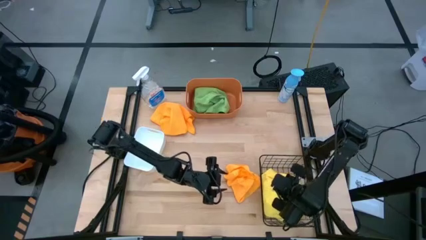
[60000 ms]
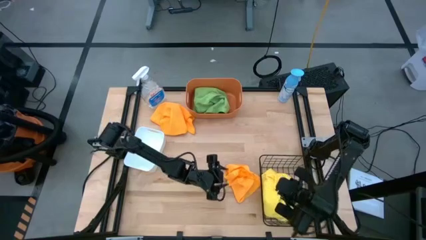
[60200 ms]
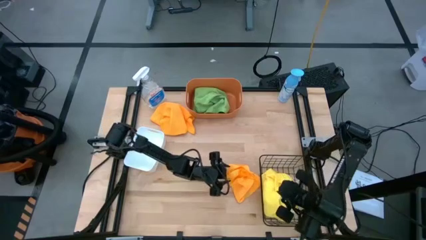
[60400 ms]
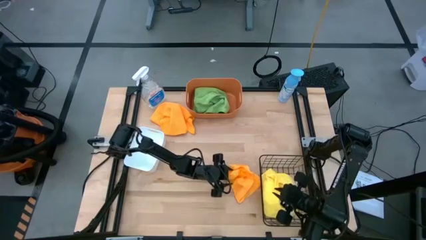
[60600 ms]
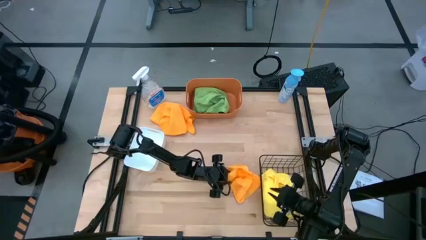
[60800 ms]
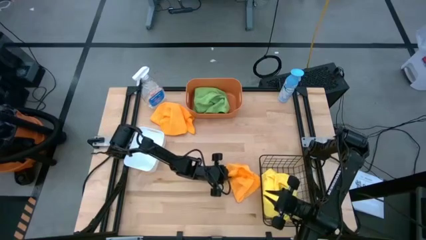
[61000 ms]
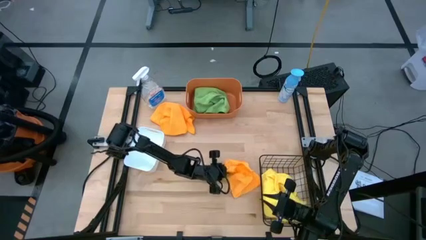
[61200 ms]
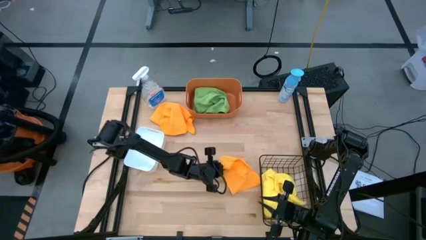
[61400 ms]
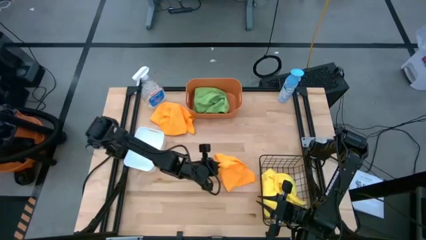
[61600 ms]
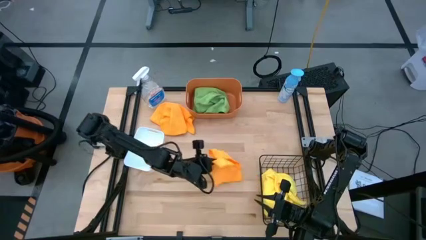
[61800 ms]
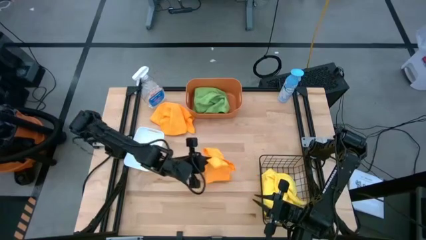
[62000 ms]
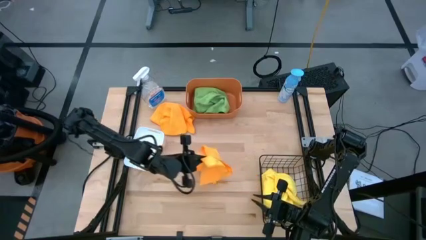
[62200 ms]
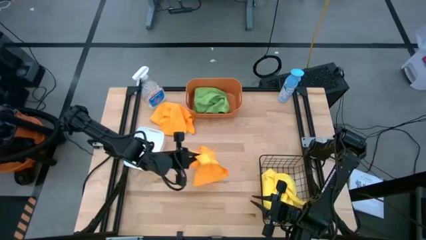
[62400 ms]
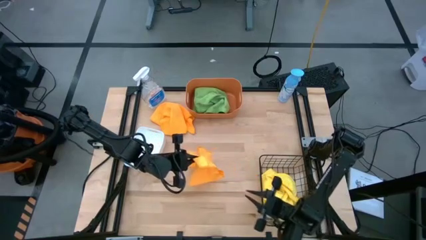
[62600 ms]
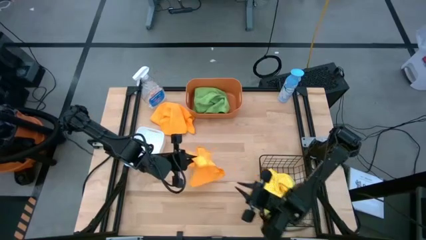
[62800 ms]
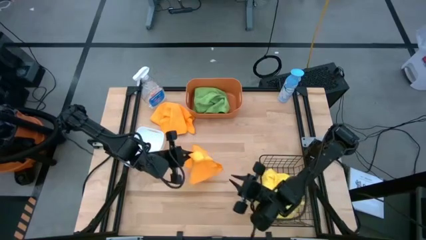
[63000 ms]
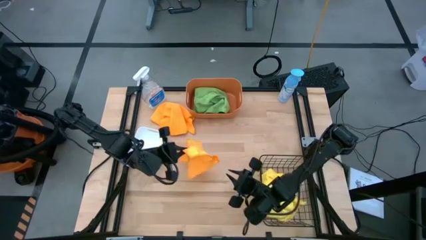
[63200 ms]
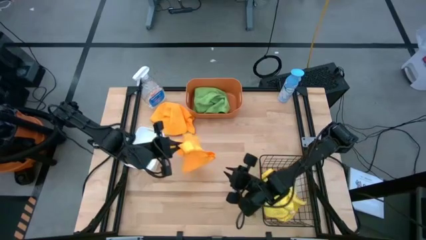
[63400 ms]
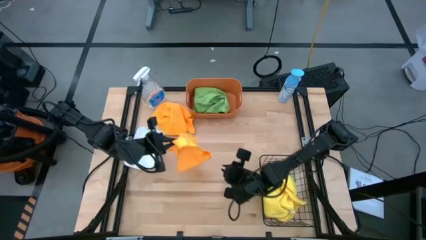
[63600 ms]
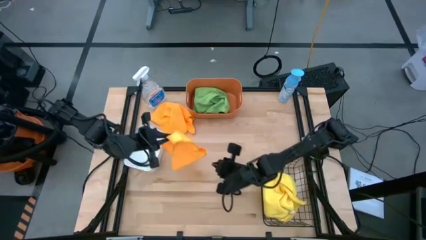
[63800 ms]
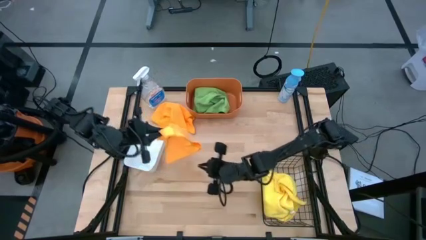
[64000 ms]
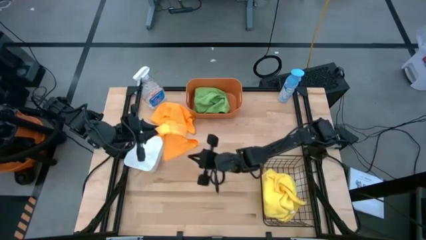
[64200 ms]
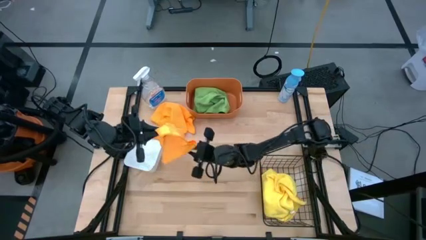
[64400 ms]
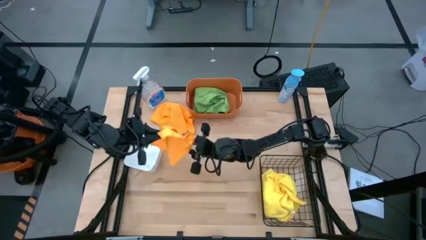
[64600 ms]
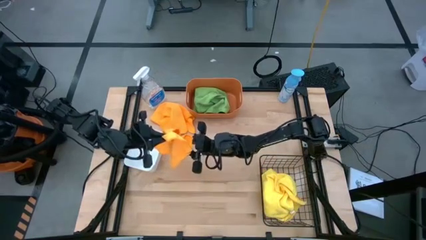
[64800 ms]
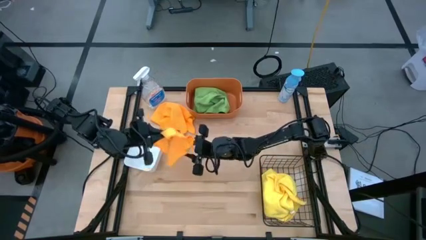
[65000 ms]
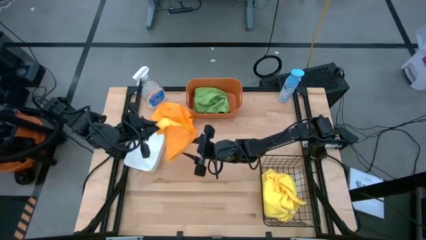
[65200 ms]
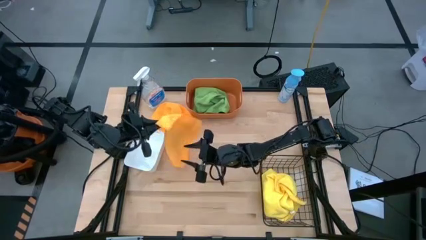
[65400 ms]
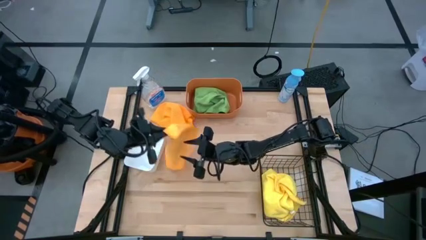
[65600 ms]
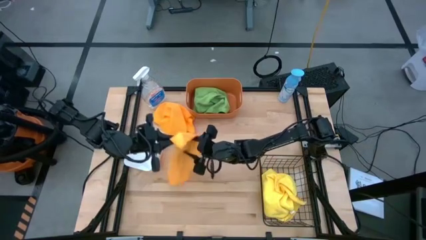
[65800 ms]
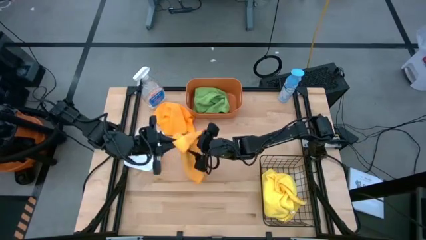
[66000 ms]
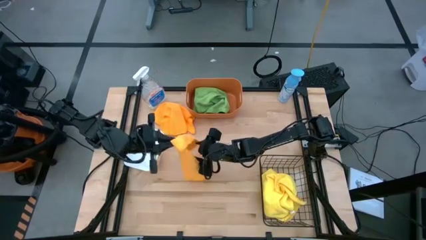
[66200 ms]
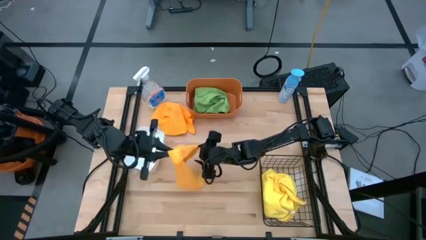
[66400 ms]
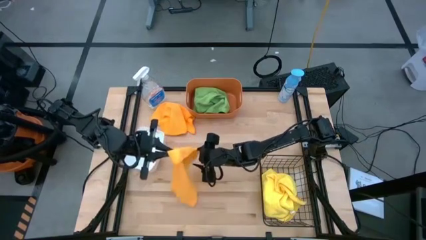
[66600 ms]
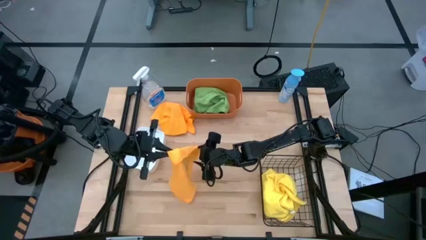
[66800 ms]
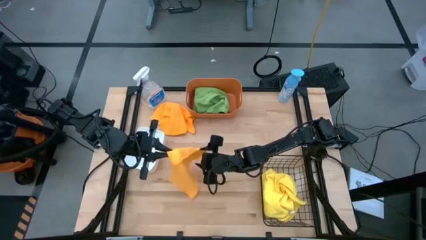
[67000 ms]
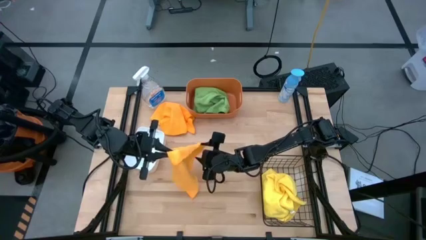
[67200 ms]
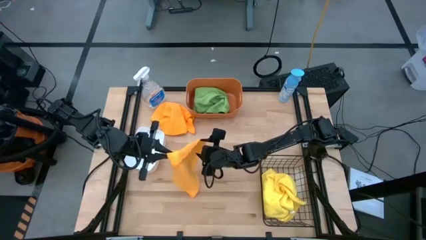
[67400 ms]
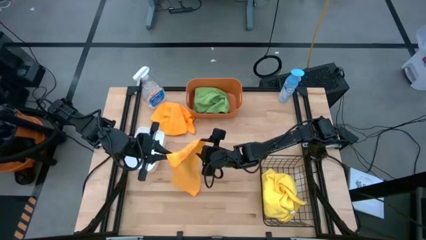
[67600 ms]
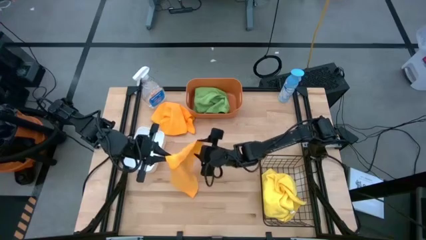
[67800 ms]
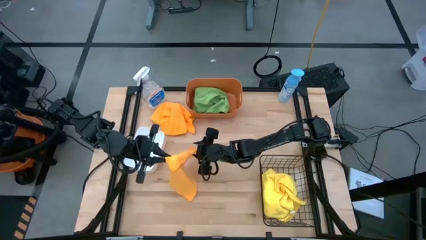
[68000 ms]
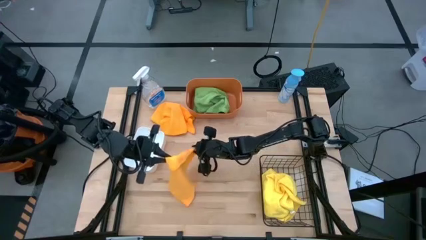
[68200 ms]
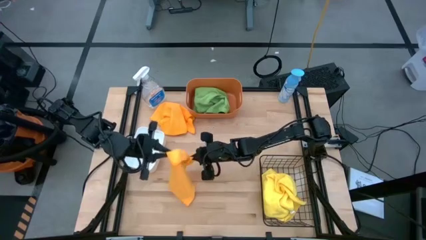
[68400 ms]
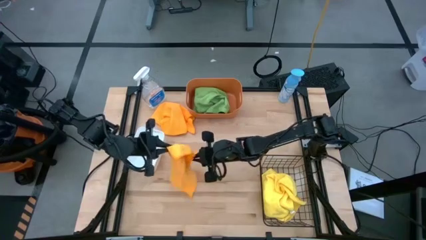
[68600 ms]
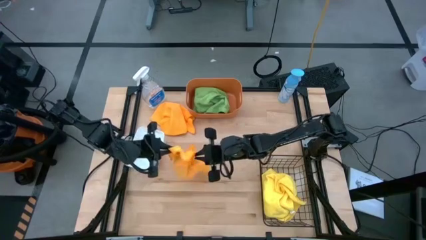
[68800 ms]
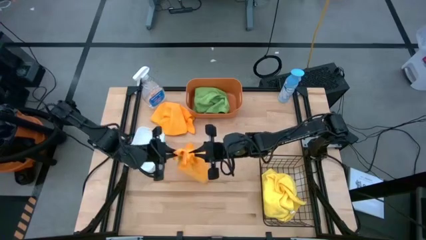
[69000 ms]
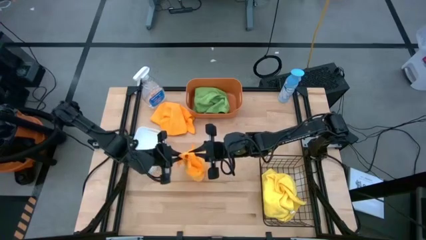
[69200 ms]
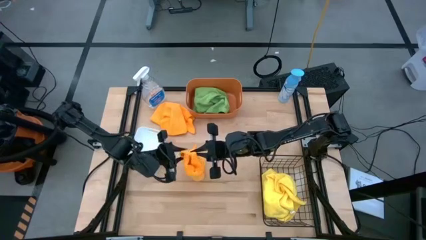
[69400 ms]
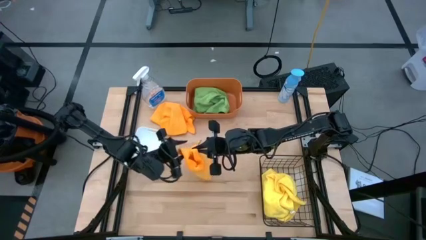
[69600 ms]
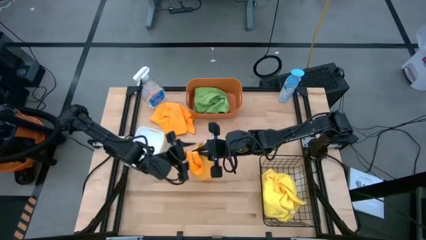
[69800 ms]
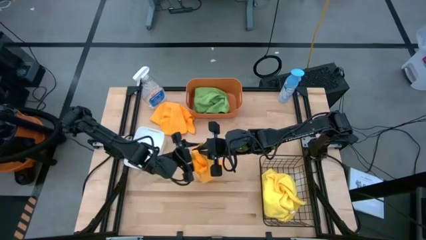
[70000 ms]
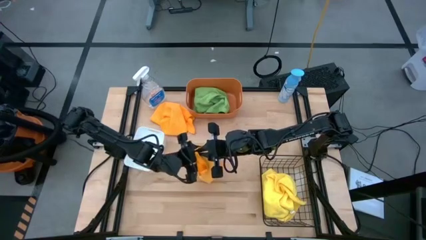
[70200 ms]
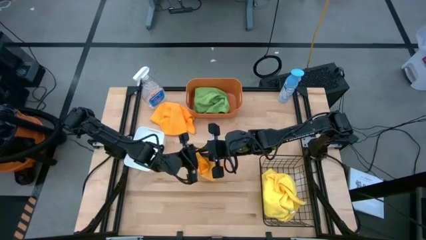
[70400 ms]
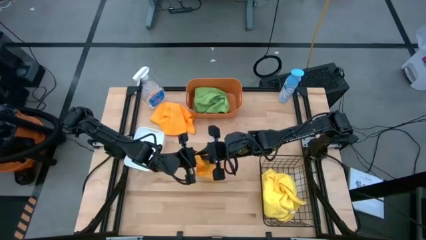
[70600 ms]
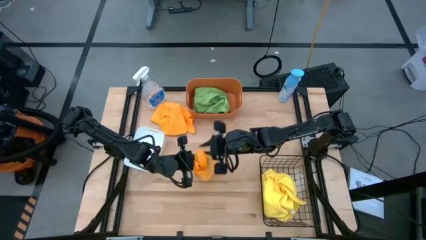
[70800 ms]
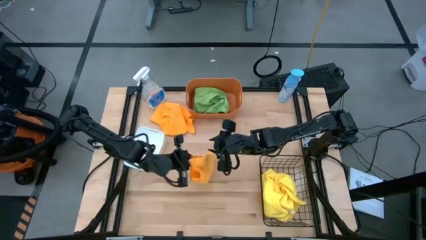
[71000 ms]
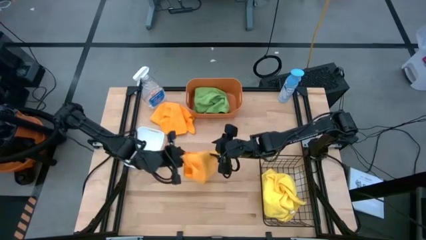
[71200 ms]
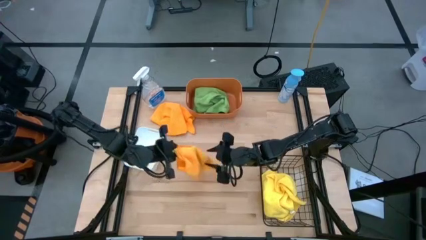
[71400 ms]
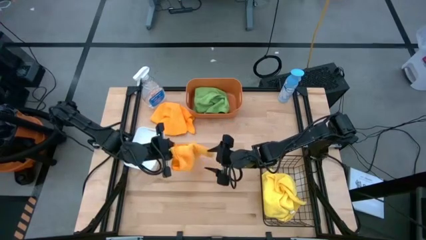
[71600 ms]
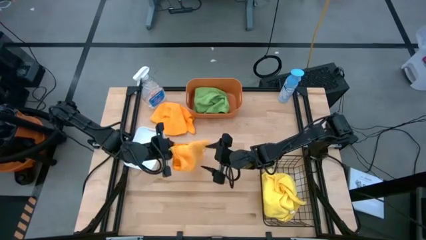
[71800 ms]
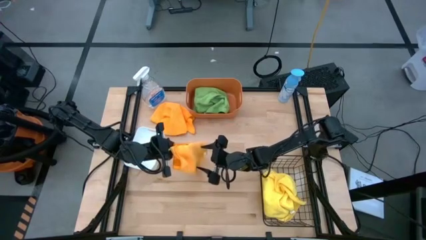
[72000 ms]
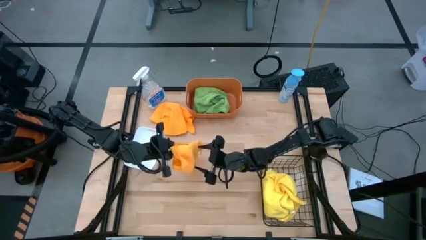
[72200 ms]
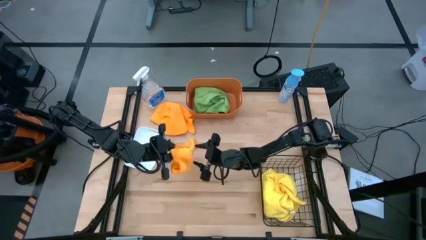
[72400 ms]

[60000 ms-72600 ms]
Task: Sort microfiber towel by color & place in baskets
Put the bottom orange microfiber cloth into the white bin

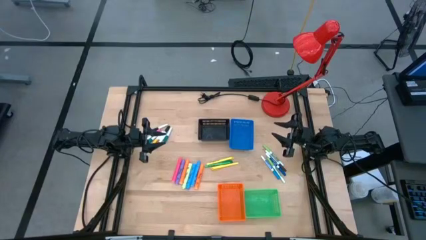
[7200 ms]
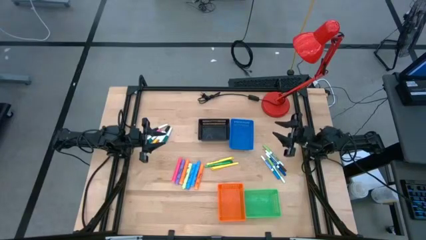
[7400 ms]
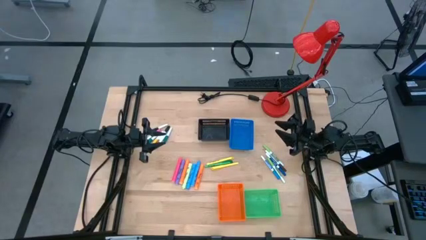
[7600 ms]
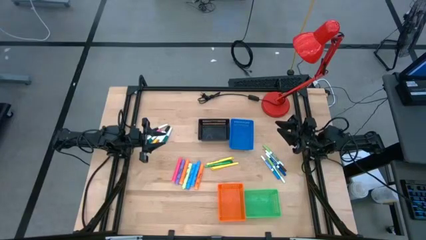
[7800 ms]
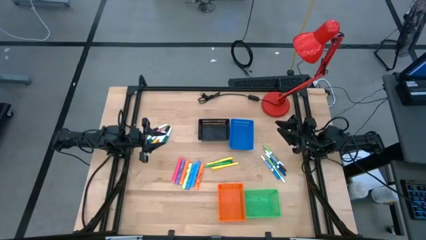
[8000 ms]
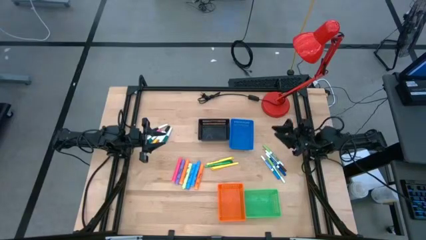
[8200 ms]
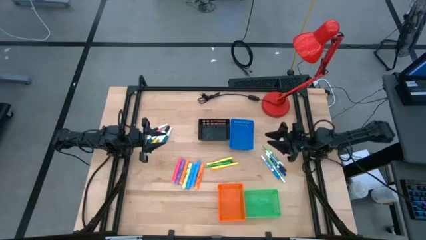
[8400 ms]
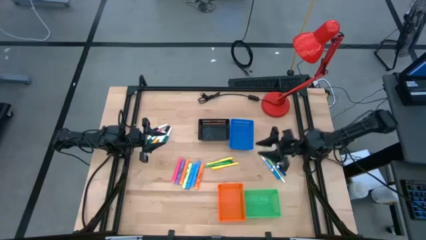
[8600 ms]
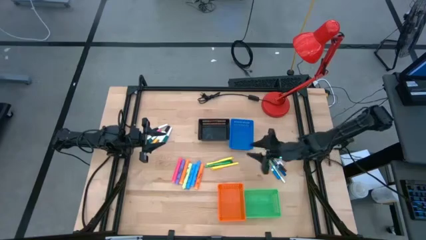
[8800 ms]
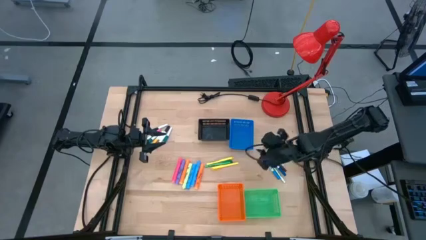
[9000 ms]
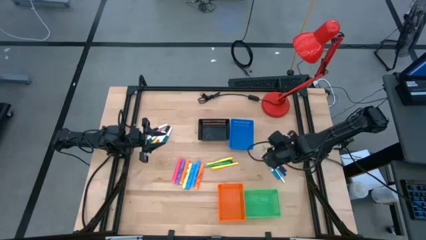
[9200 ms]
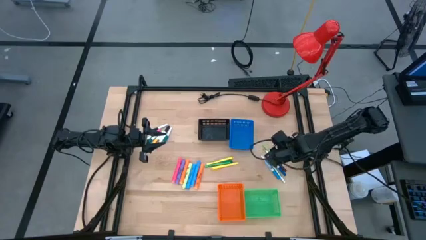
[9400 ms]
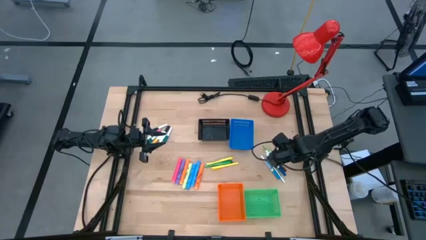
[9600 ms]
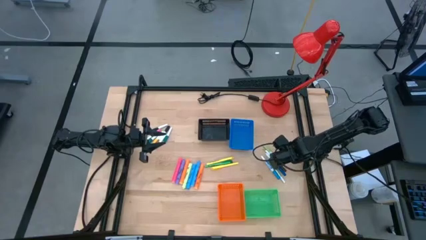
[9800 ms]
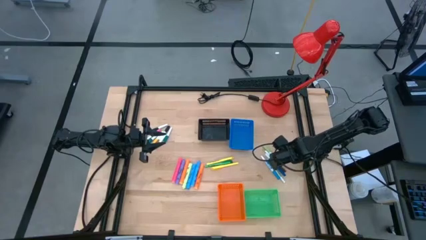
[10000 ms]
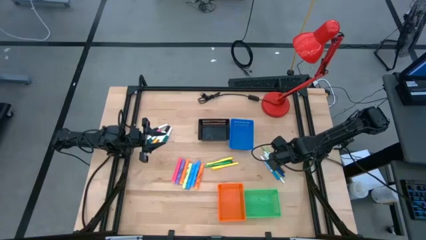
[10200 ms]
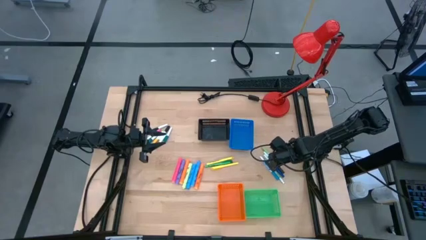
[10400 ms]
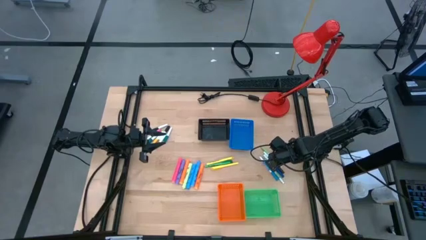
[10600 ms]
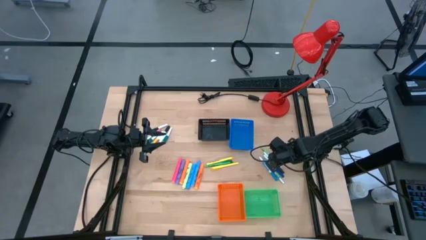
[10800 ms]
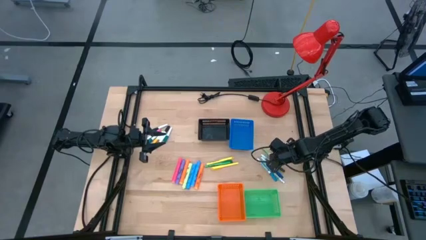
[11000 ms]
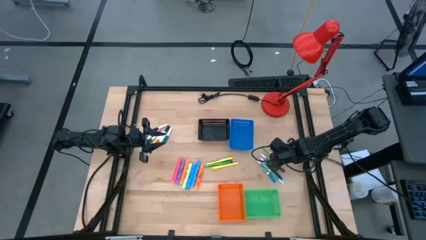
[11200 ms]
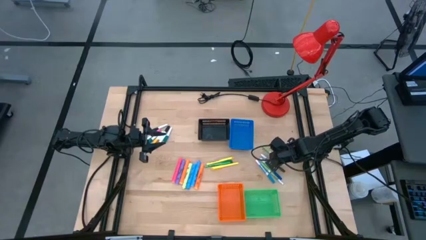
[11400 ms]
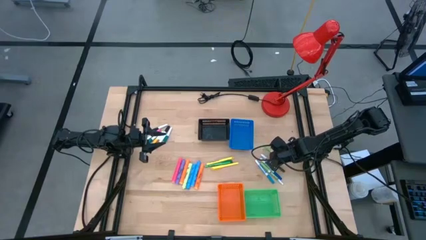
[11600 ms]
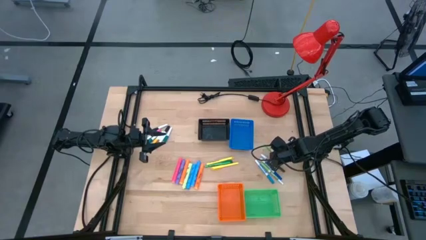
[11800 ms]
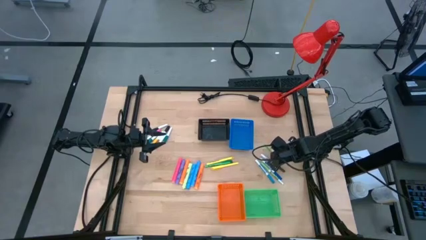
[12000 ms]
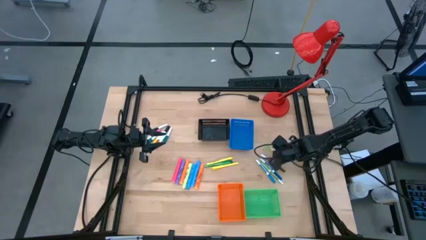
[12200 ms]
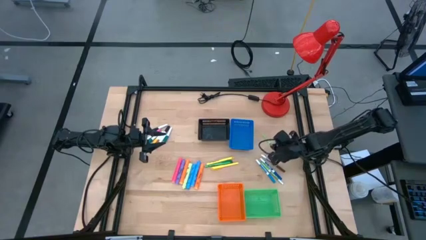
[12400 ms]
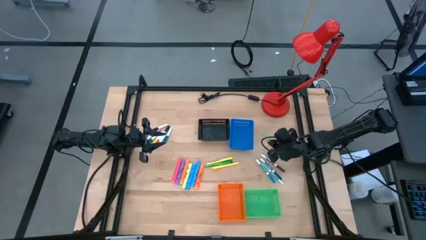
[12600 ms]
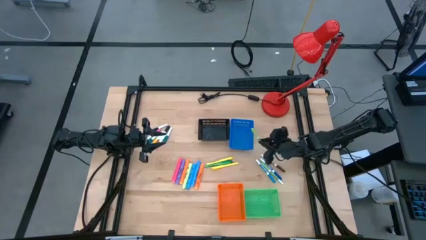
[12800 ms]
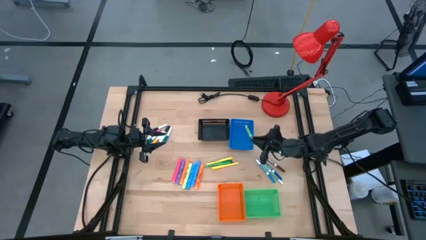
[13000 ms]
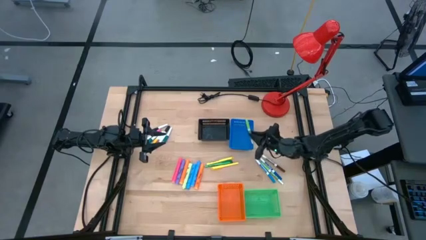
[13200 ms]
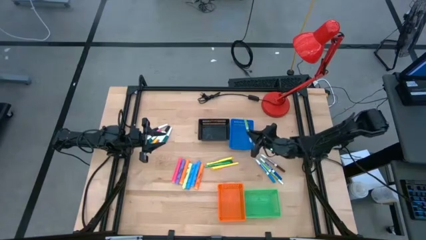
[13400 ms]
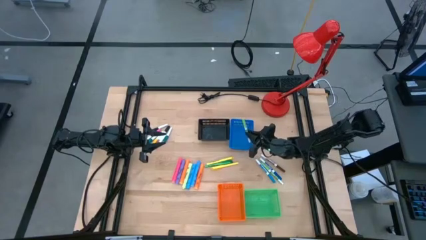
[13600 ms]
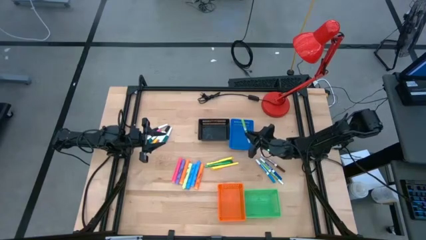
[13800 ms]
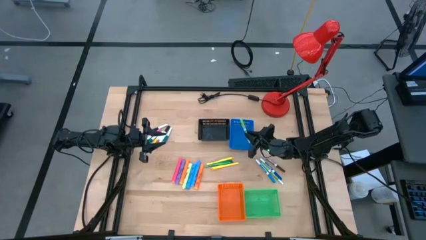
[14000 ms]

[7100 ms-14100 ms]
Task: Pick & Place Markers
Put the green marker pen into the blue bin
